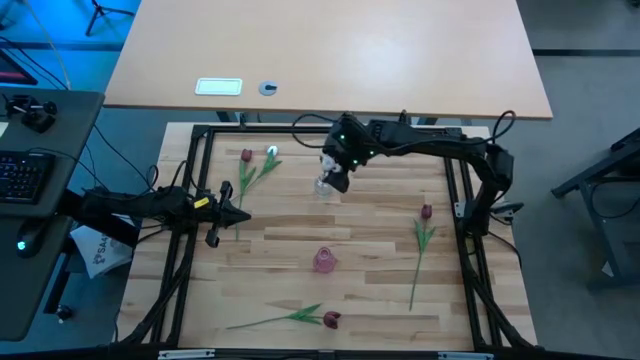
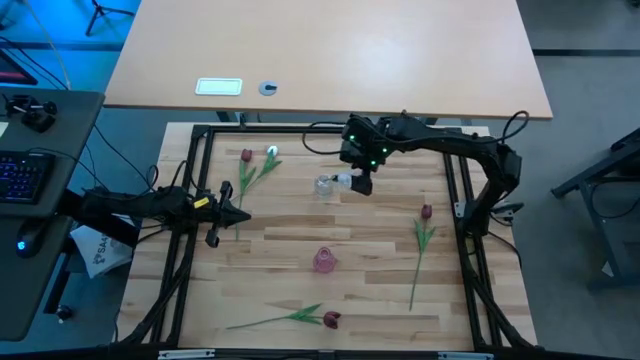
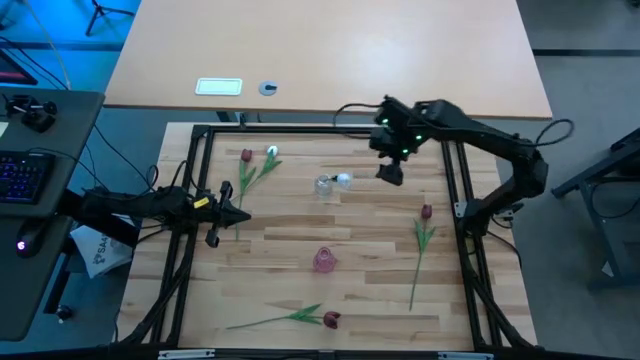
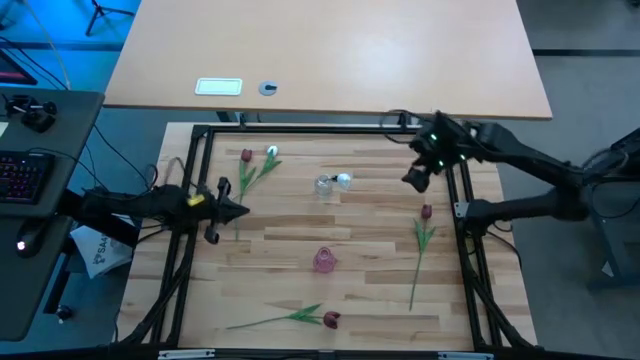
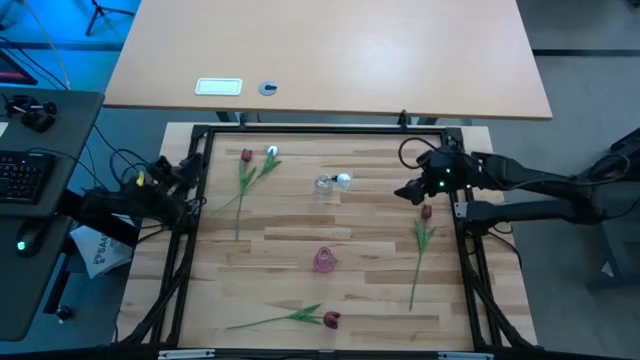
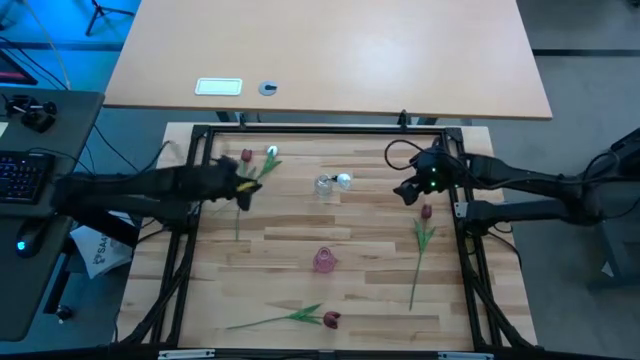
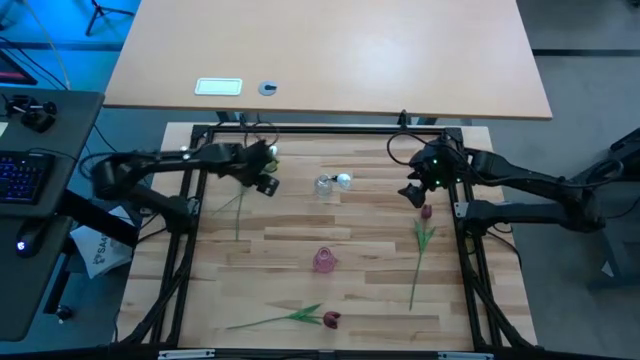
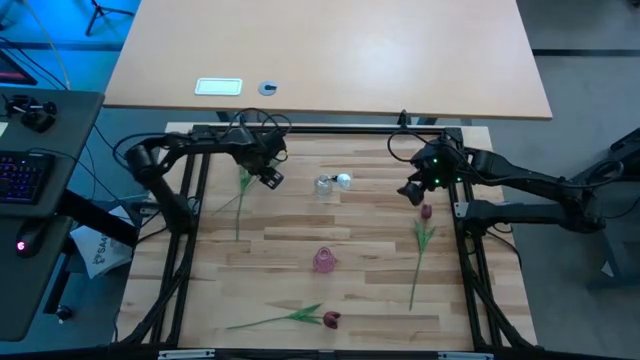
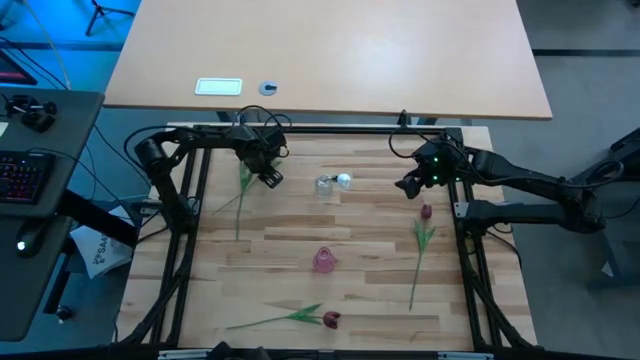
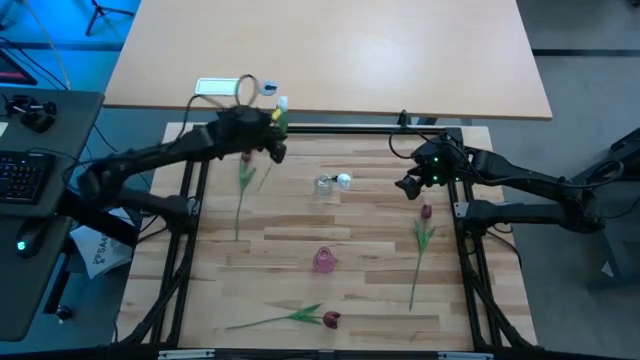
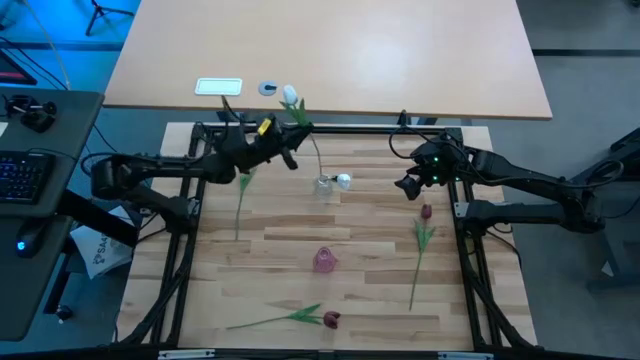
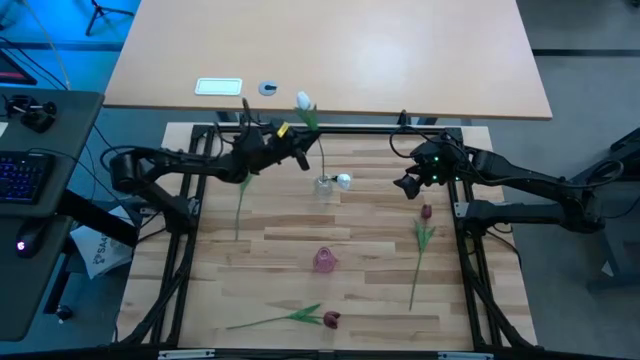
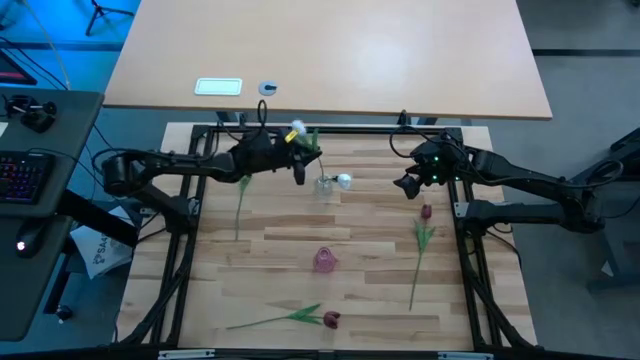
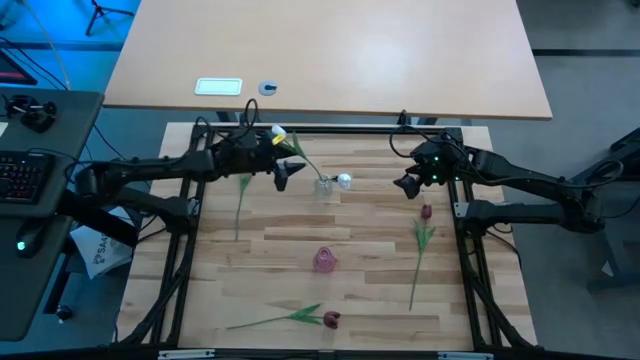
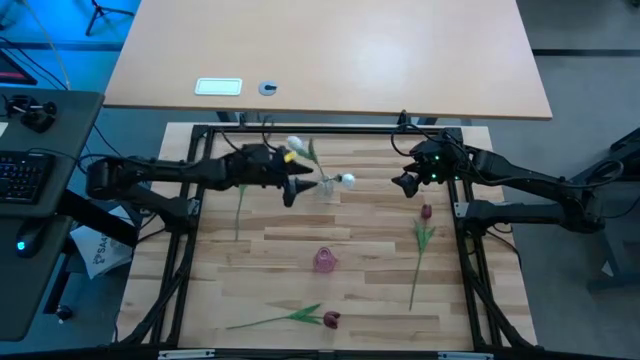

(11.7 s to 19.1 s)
Task: Sort flowers into vase by color
Put the white tulip into the transparent vase

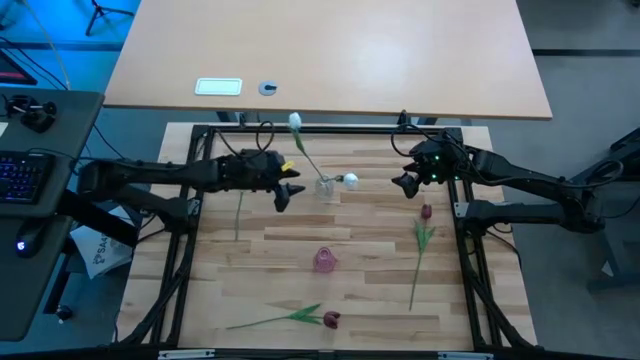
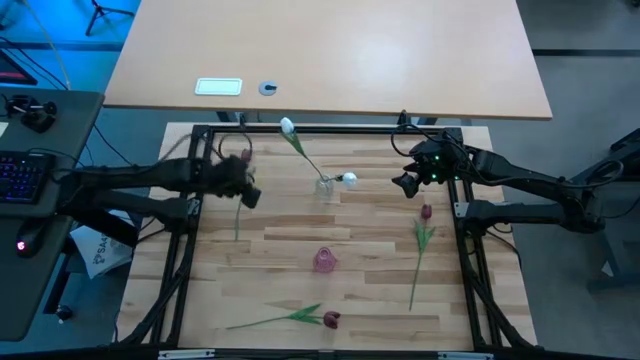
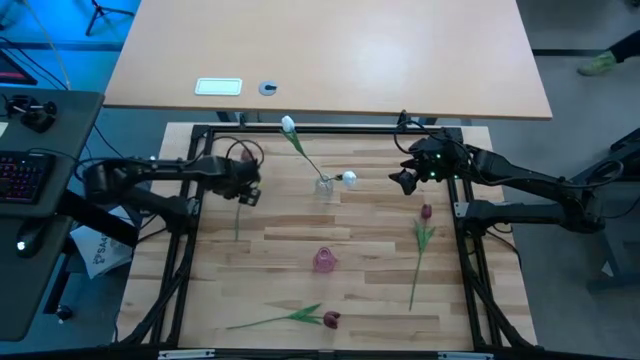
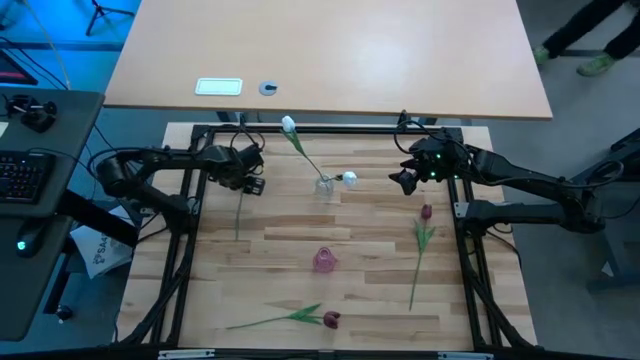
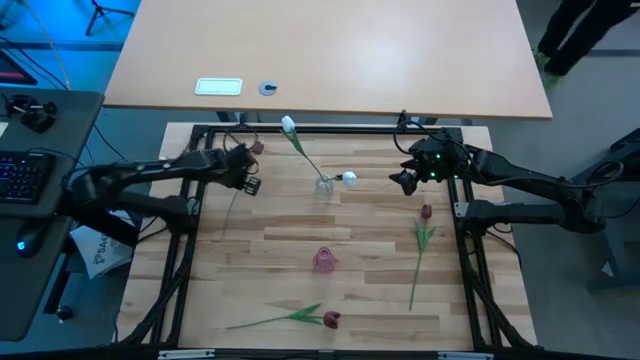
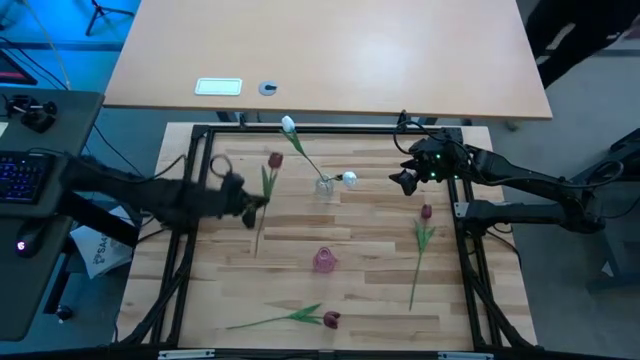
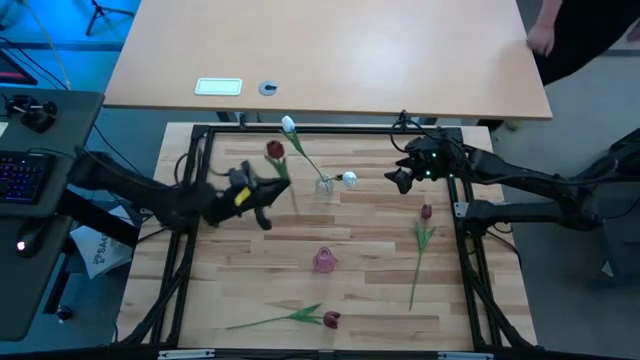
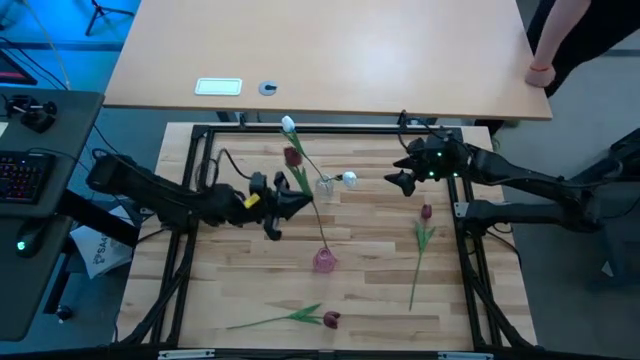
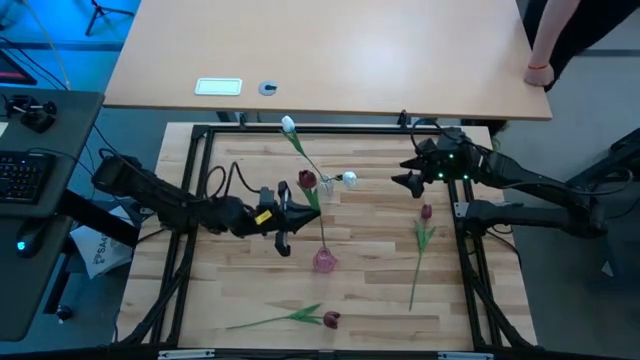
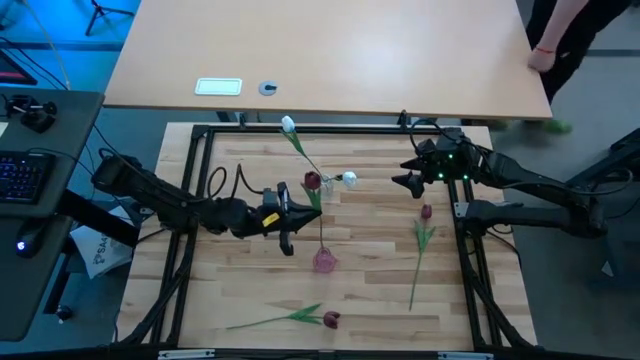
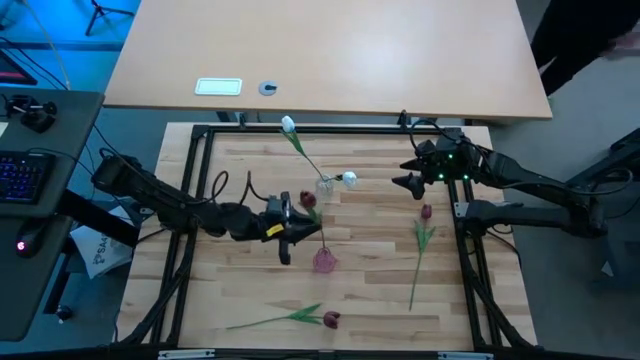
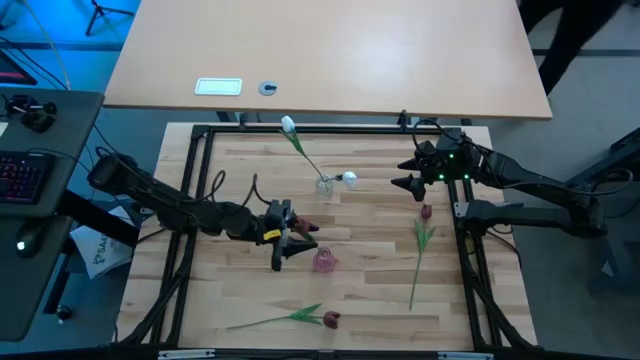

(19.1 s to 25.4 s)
Put the top left red tulip into the pink vase

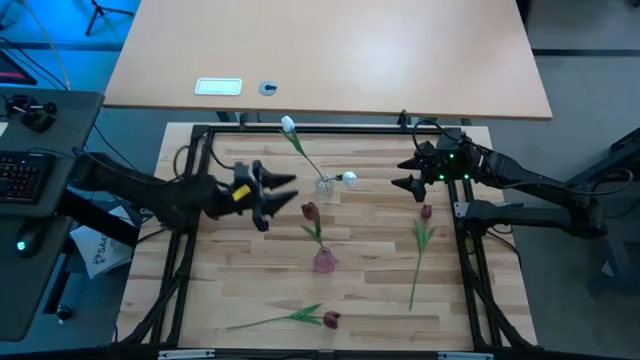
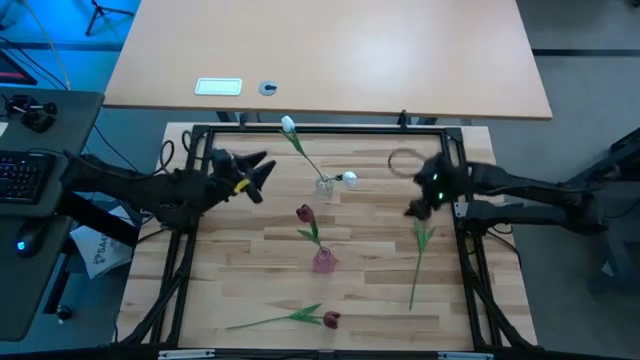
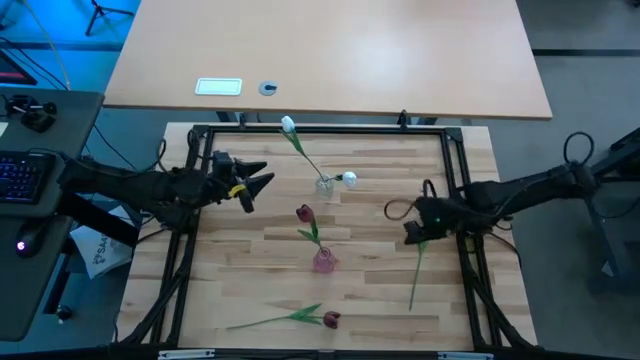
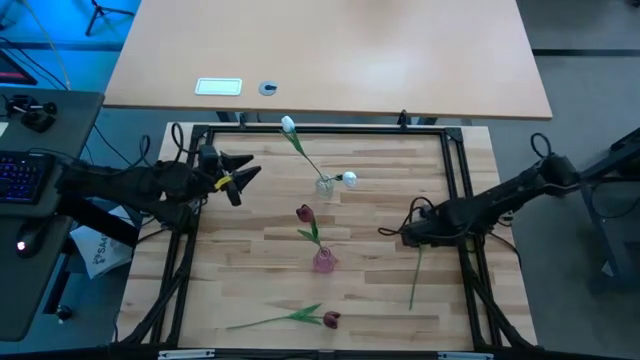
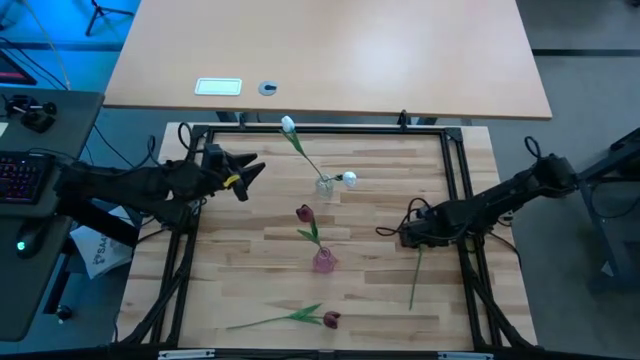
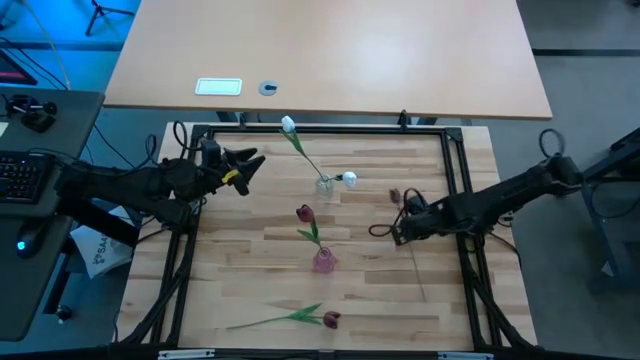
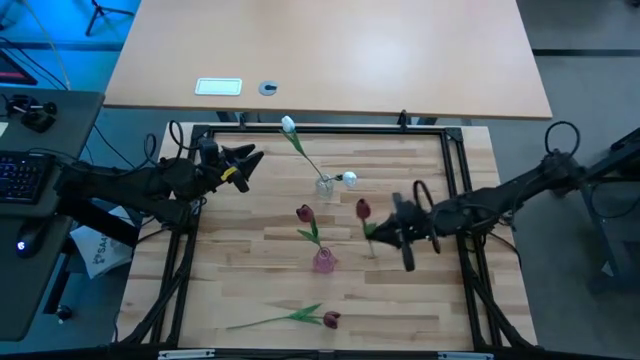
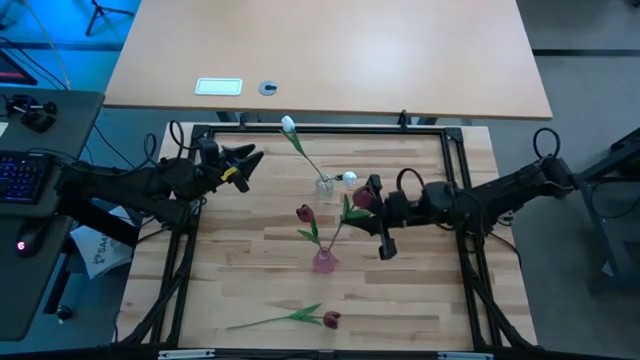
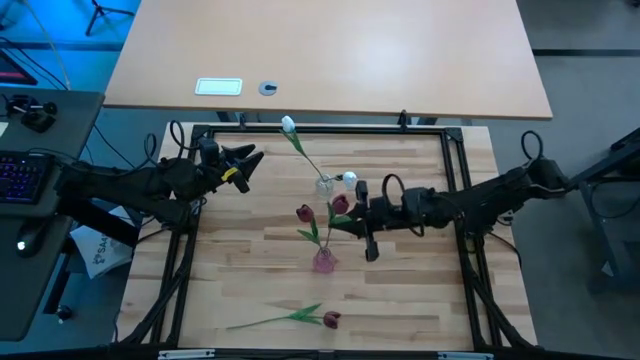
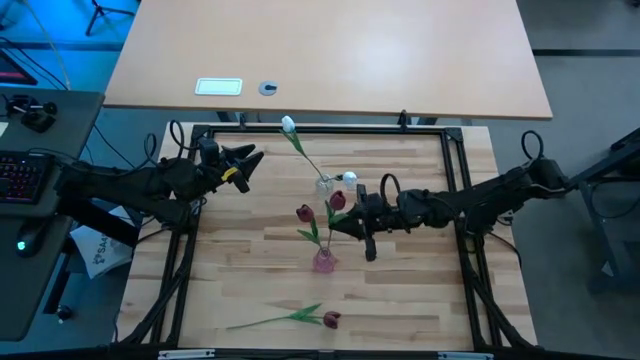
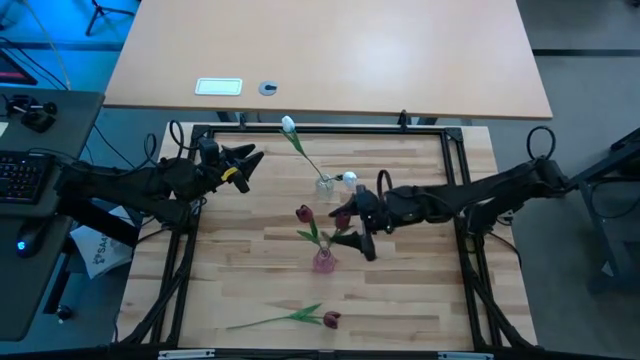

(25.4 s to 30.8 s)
Put the top red tulip into the pink vase

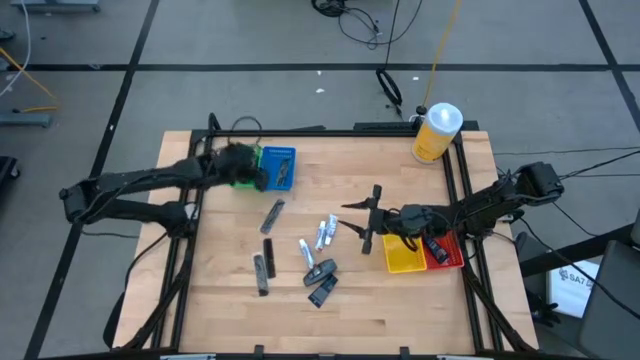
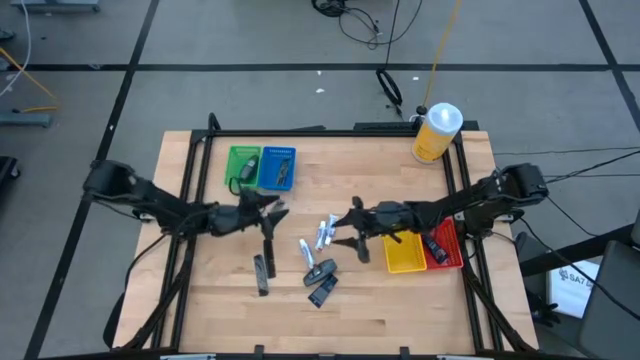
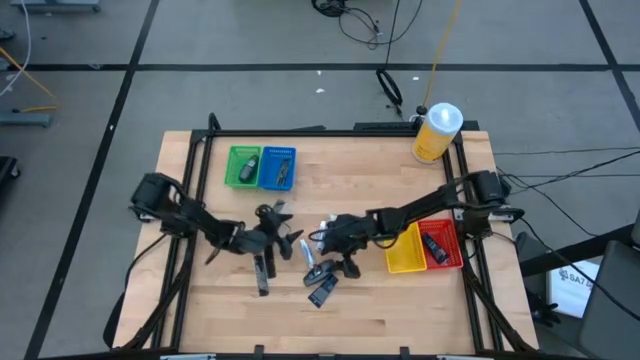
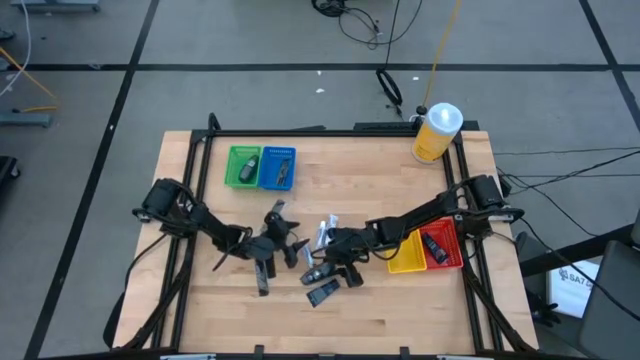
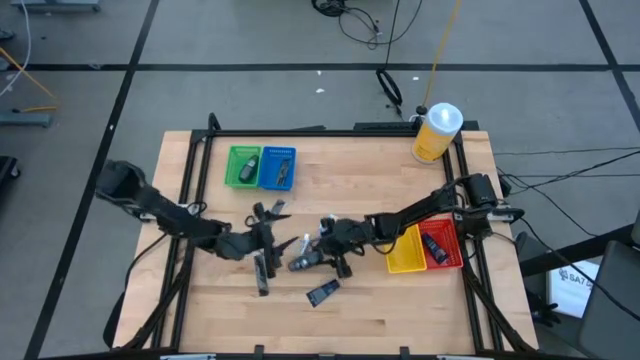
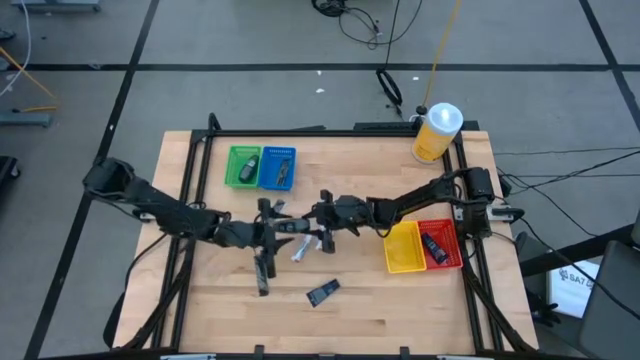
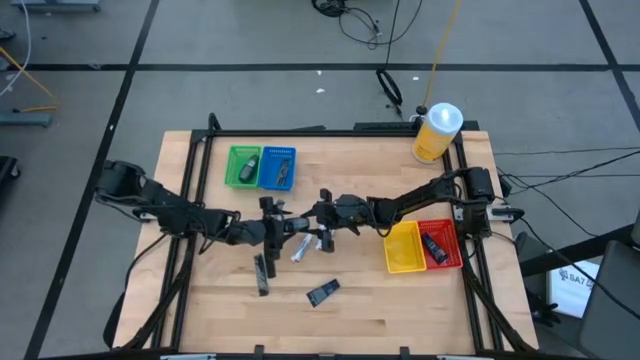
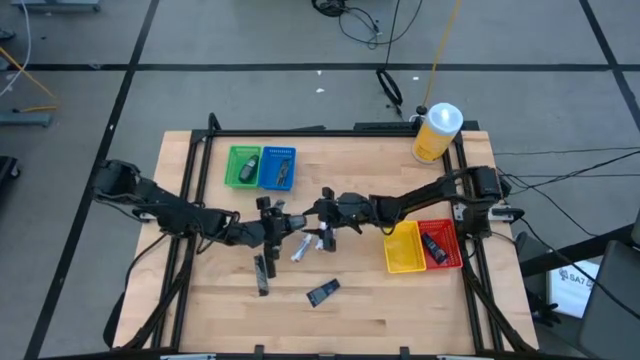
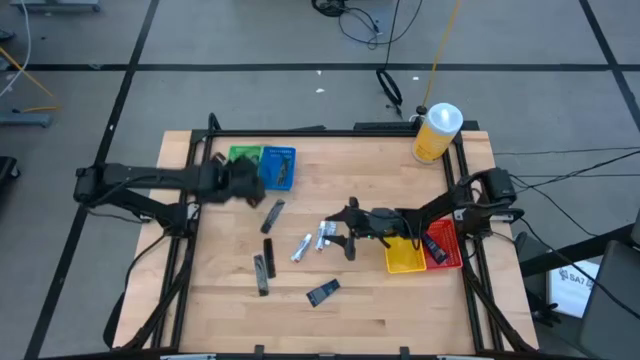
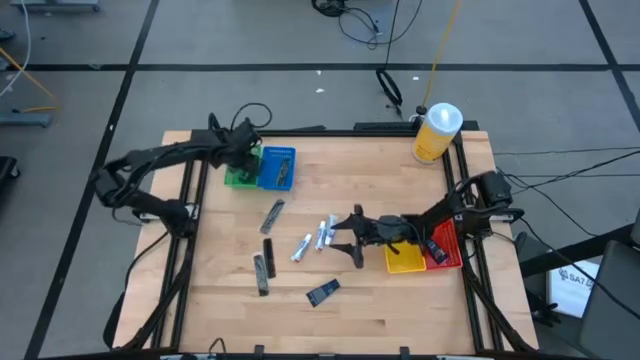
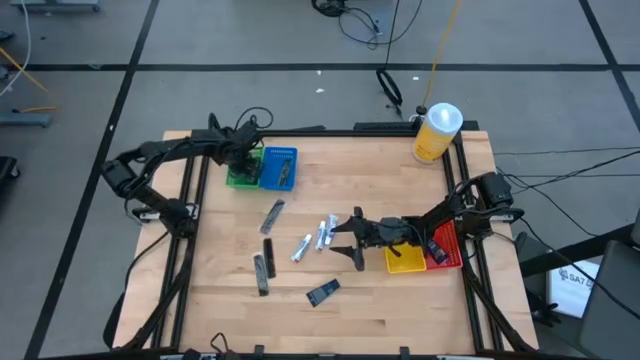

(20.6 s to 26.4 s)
Task: Pick & Place Travel size toiletries
Put the black deodorant into the green bin
